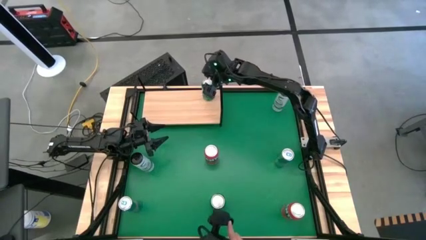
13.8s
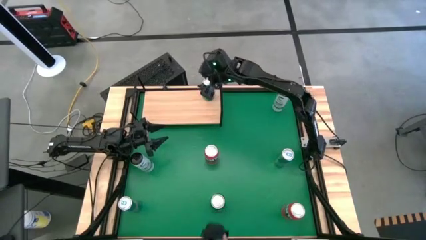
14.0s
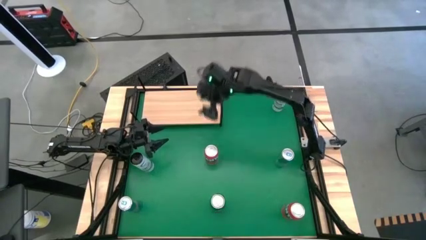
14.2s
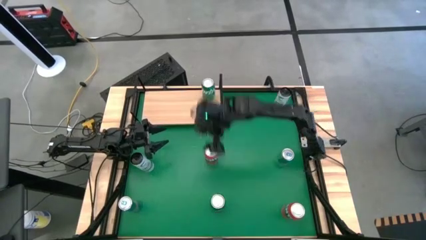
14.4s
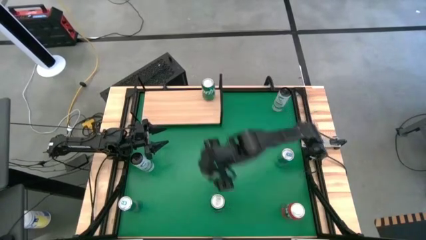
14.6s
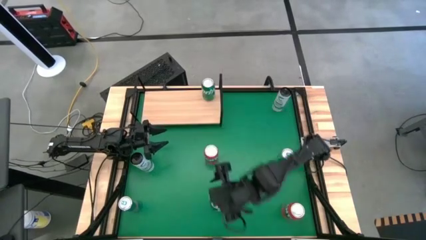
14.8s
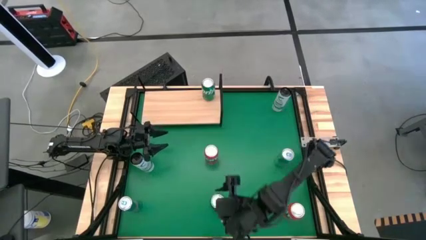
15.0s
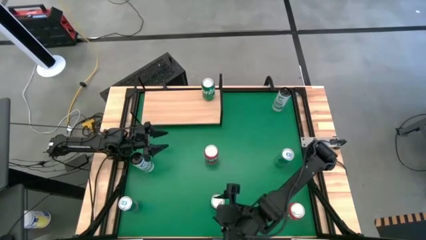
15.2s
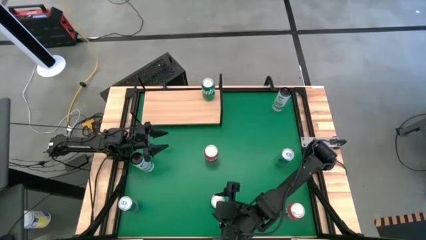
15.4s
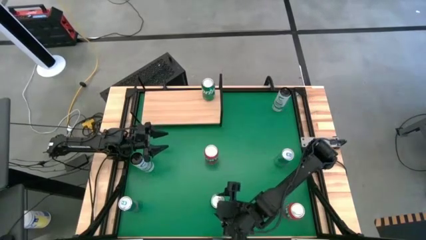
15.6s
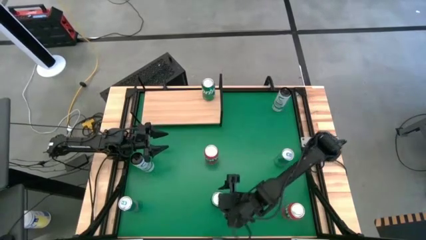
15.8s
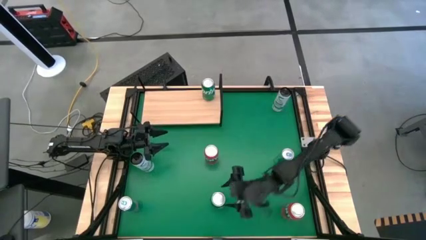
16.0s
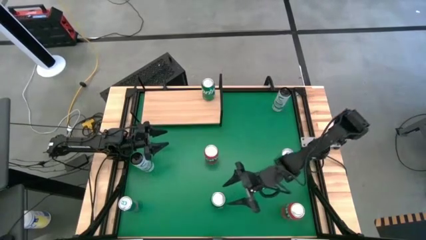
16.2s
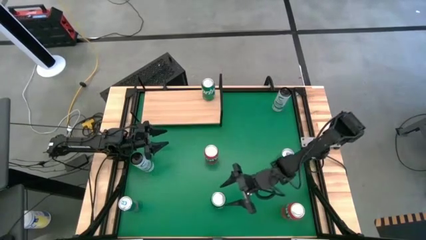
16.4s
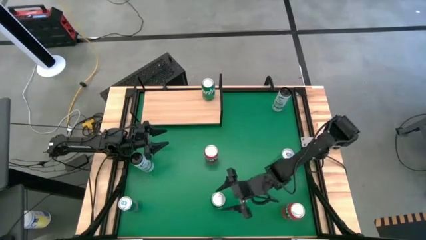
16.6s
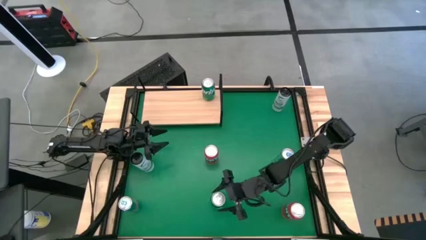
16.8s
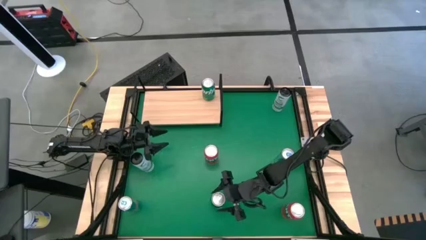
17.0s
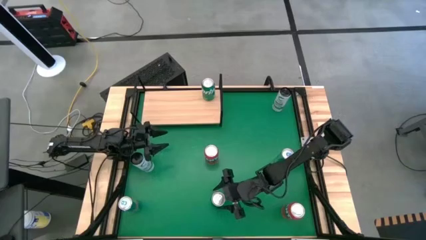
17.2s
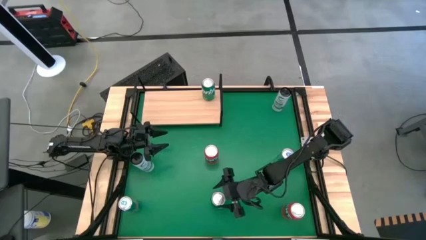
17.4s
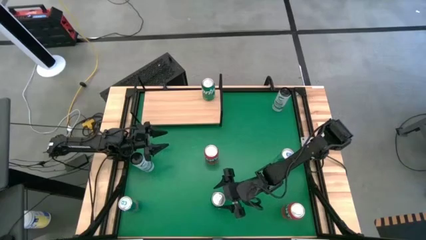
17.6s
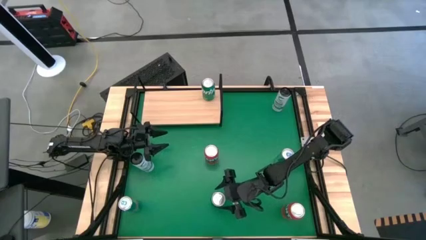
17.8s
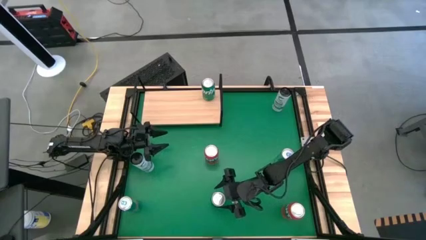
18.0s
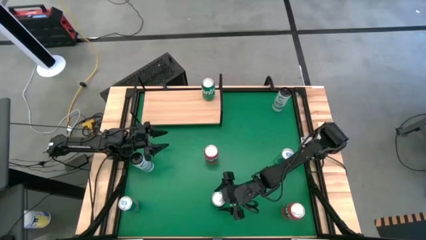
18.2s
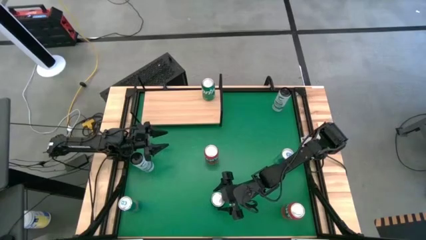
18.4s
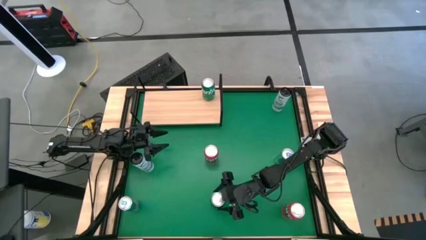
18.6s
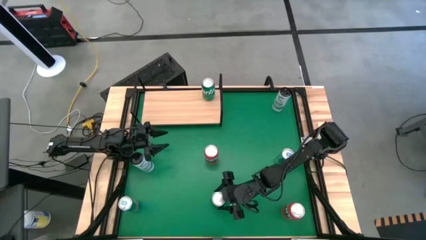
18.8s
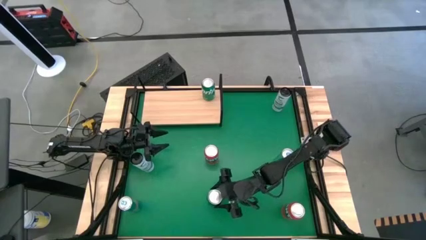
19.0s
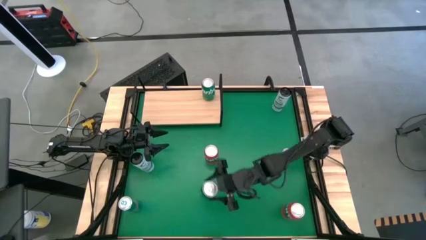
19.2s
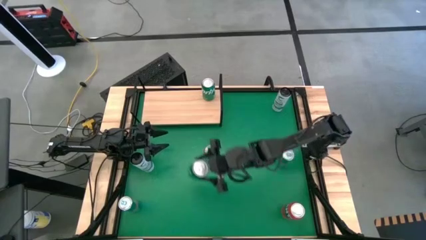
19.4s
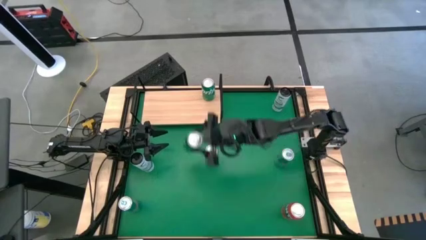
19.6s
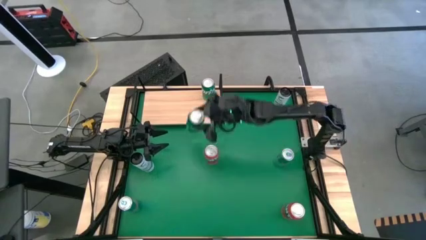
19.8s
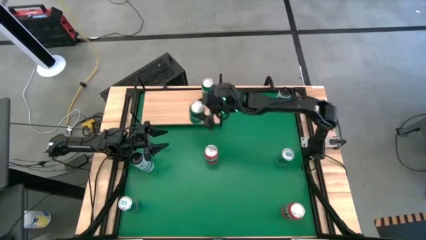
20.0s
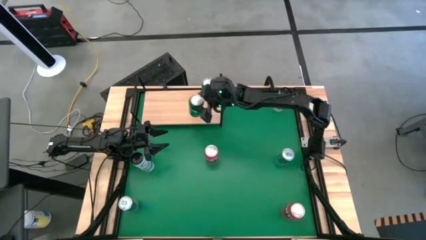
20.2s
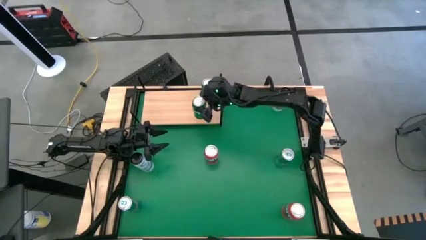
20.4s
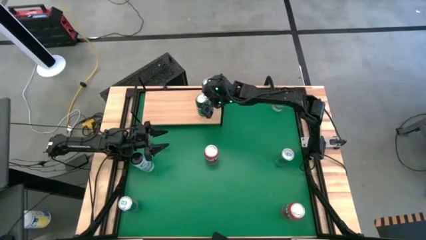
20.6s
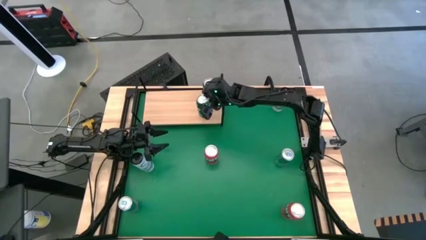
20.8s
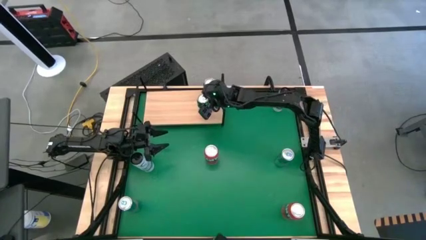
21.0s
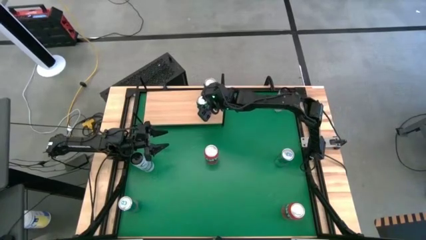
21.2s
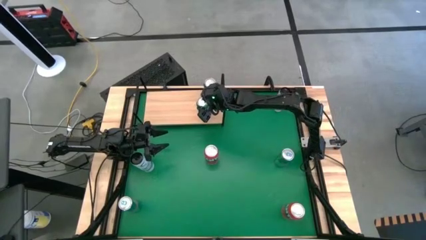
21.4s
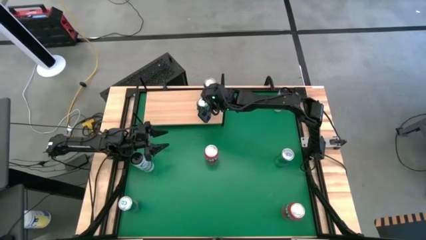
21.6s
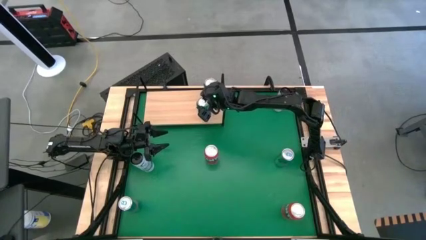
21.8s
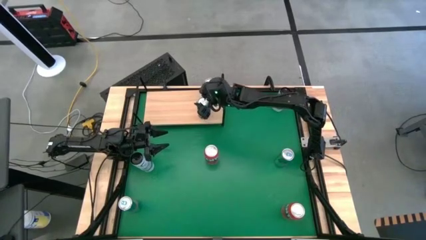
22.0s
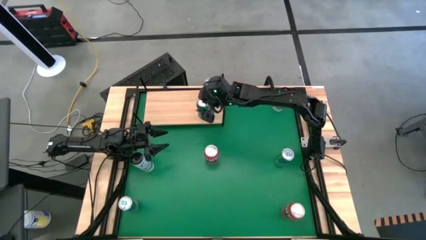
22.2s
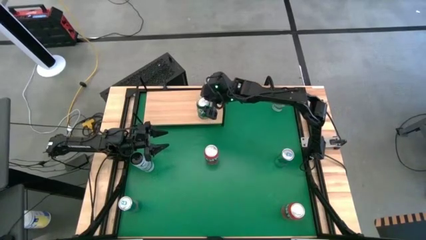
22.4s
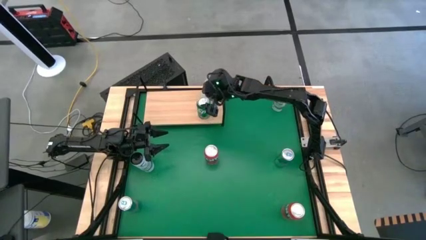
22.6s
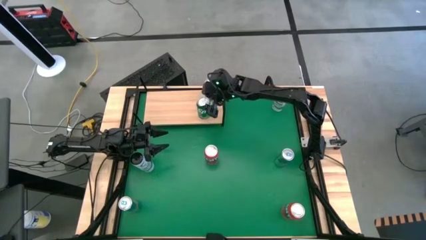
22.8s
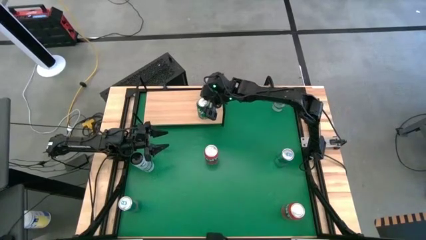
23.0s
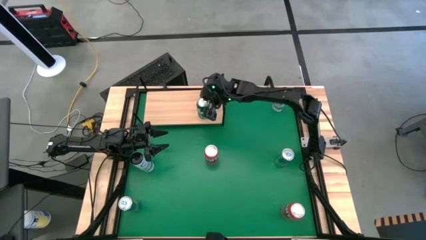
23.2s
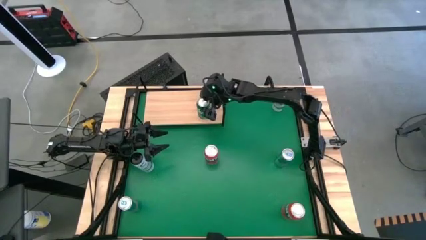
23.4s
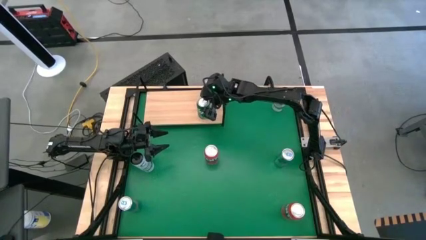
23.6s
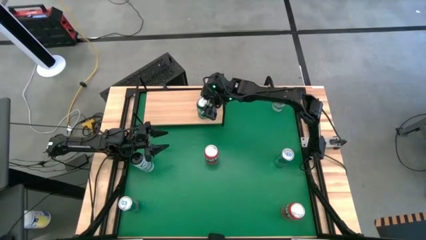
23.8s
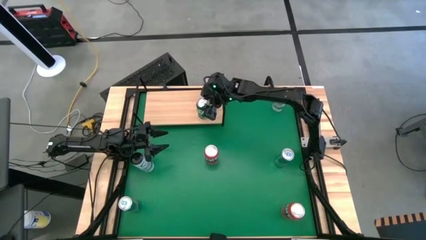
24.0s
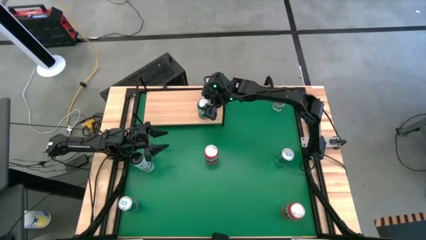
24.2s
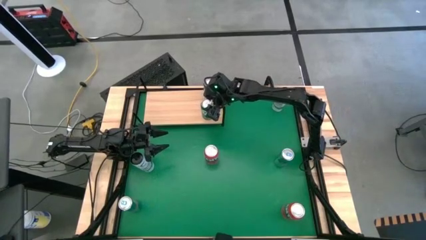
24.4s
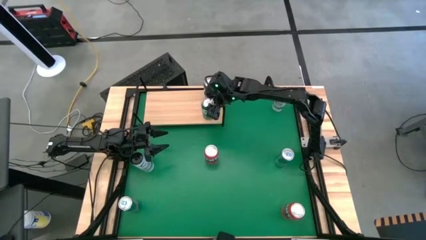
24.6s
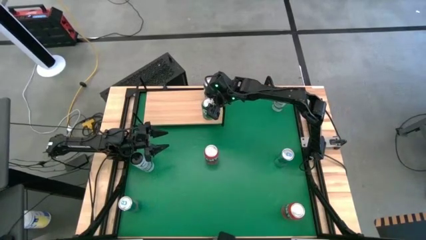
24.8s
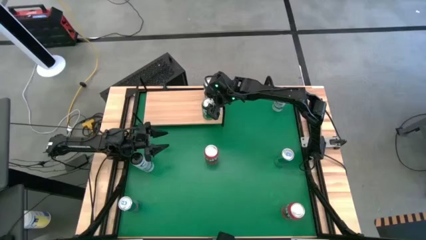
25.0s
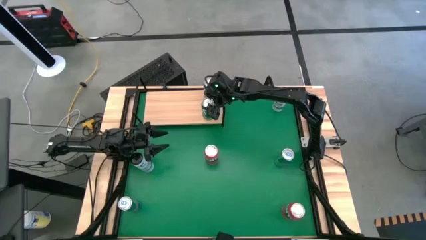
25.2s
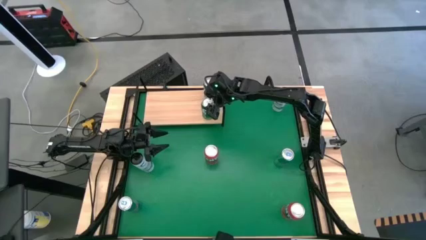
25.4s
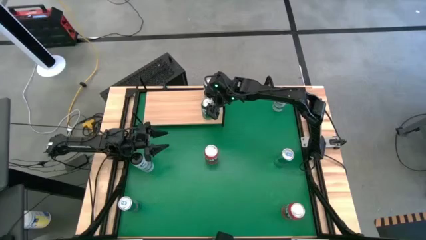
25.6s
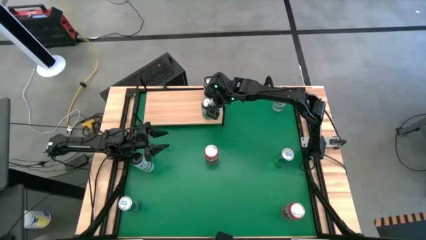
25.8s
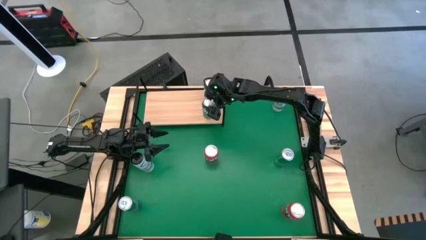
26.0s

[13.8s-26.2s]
Task: Place canned beverage on shelf
Put the green soda can aligned with the other green soda can on the shelf

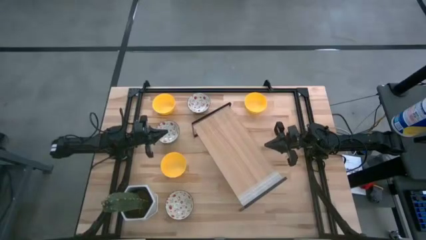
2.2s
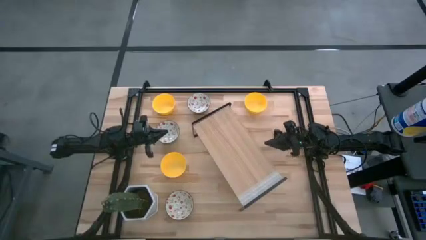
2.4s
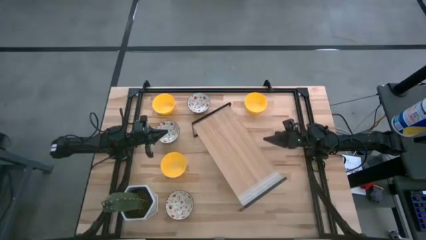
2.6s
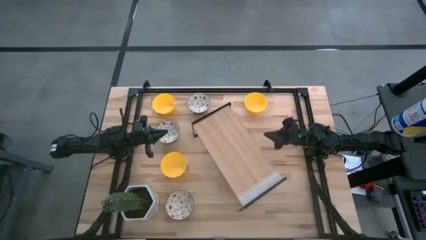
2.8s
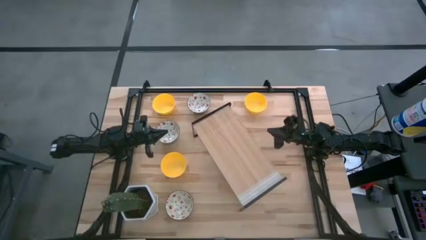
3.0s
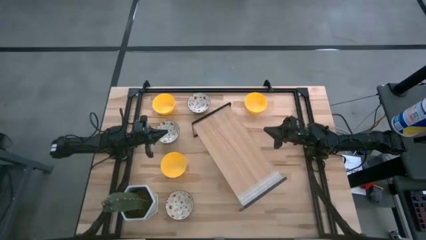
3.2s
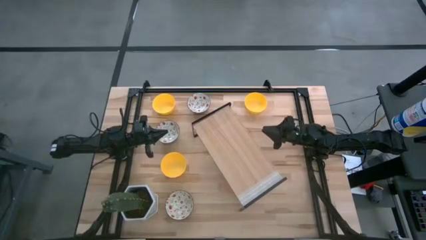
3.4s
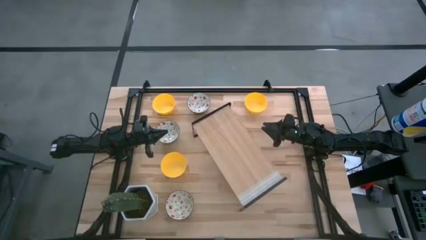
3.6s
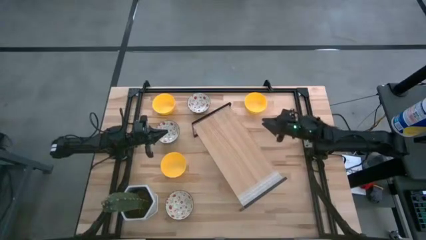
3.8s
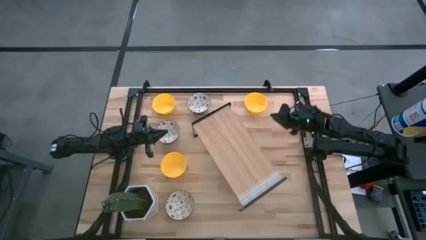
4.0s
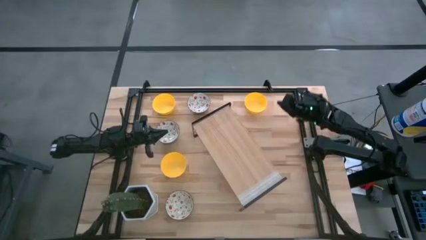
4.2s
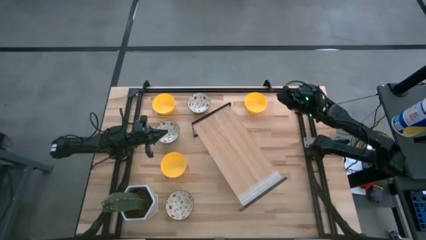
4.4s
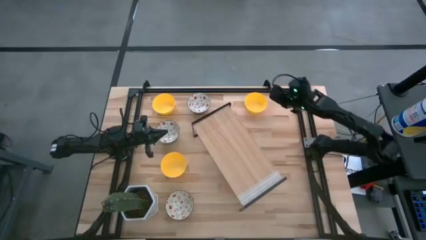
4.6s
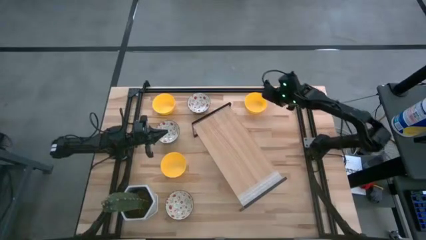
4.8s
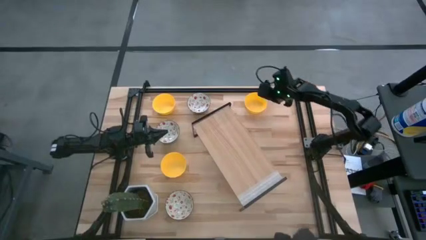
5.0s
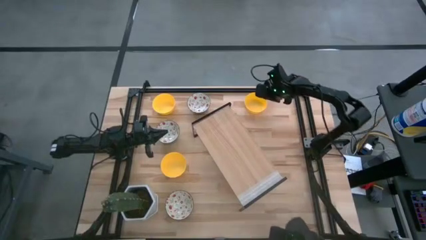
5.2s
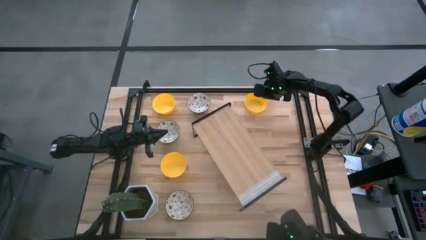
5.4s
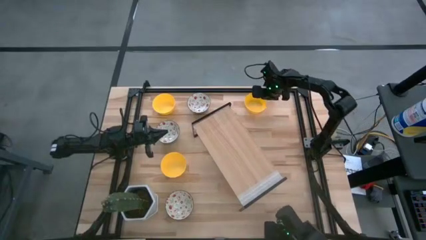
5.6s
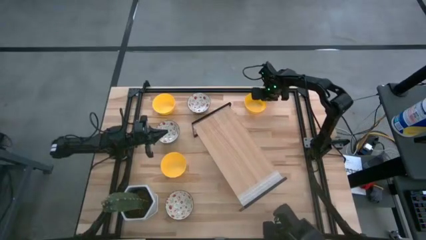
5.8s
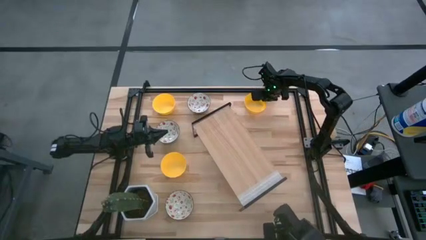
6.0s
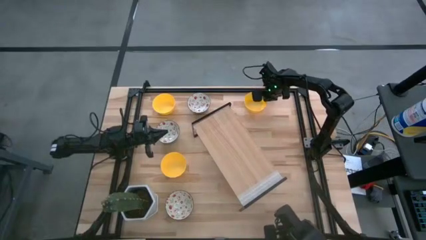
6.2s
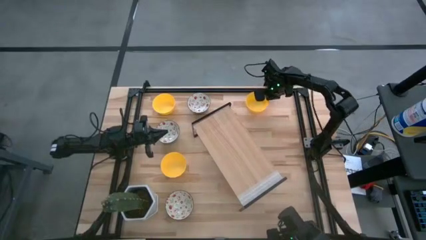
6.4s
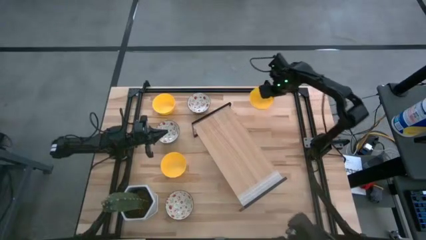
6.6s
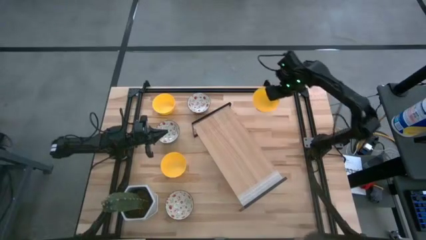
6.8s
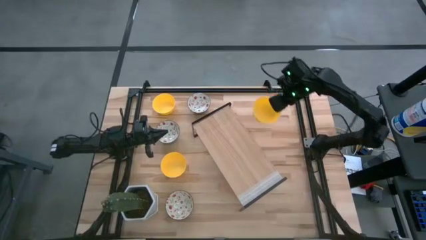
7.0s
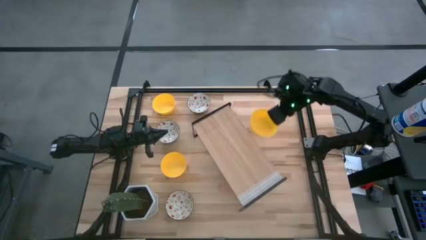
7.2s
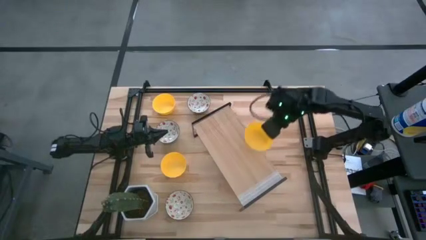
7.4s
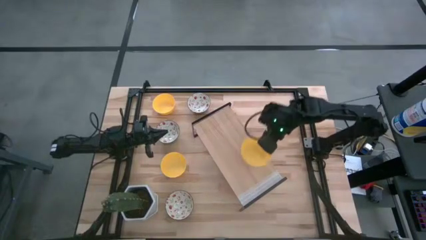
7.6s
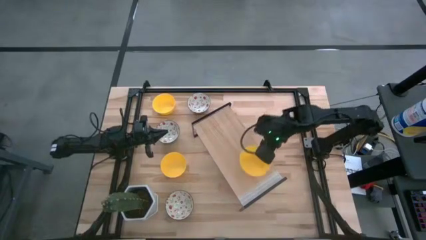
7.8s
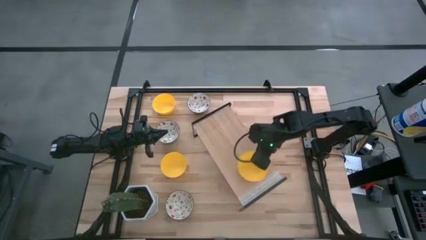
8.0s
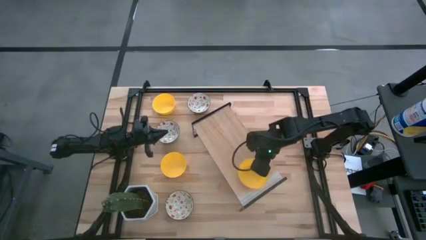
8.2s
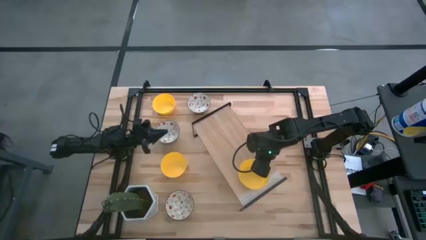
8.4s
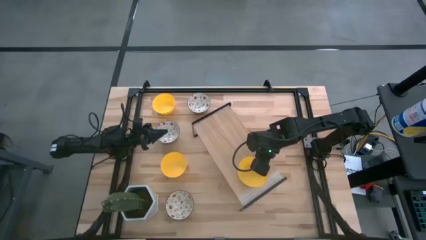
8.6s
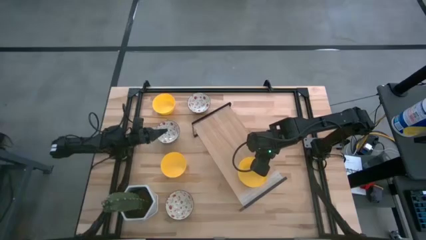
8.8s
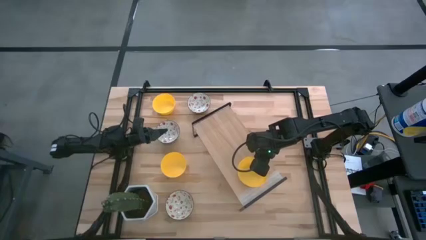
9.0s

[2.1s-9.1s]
Task: Pick & Place Mini bowls
Put the top right yellow bowl on the shelf
